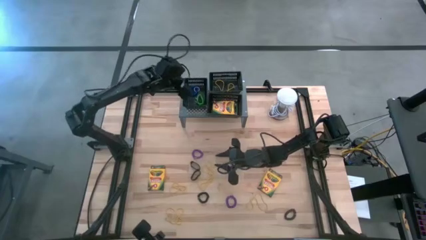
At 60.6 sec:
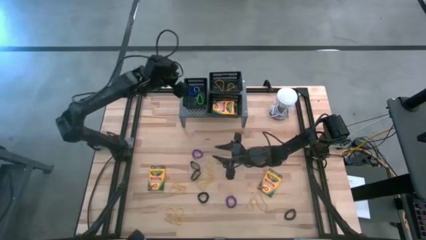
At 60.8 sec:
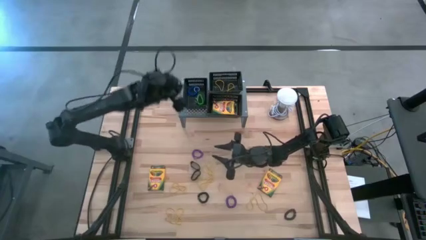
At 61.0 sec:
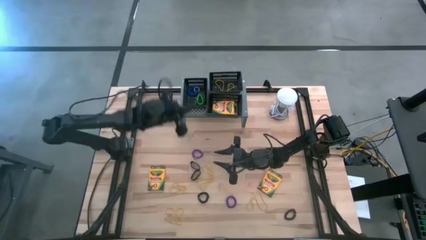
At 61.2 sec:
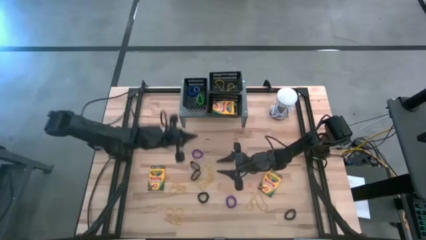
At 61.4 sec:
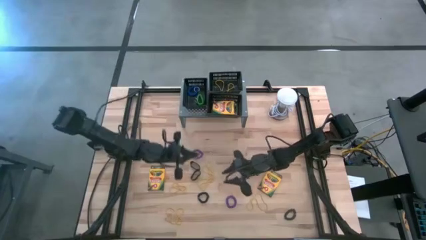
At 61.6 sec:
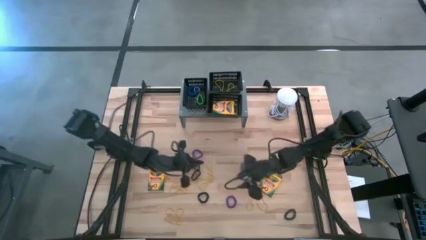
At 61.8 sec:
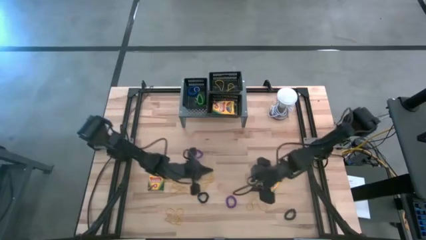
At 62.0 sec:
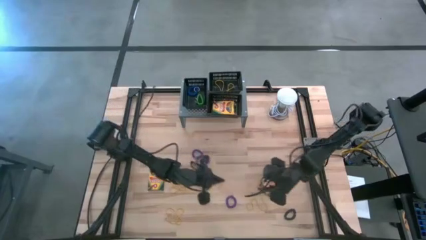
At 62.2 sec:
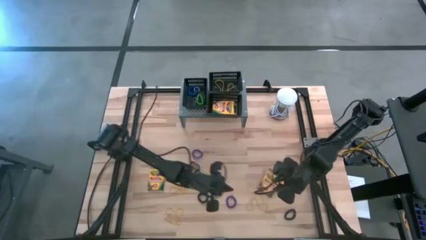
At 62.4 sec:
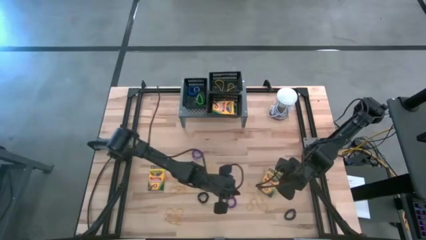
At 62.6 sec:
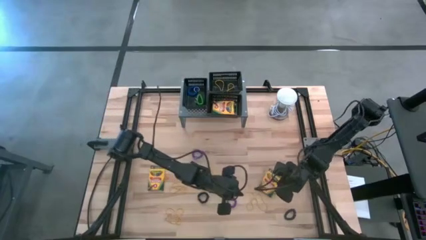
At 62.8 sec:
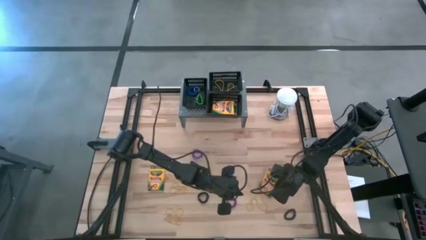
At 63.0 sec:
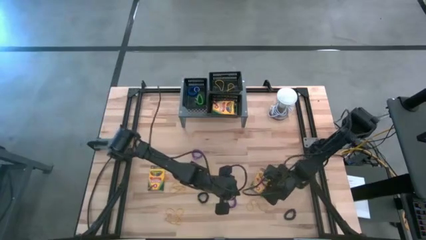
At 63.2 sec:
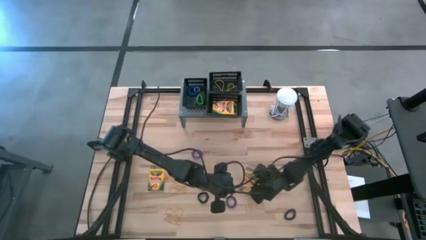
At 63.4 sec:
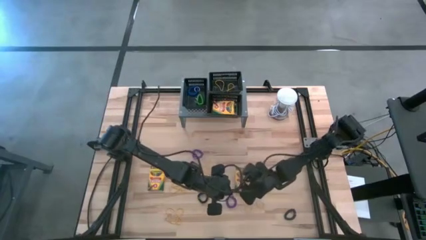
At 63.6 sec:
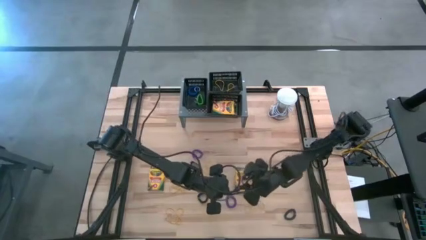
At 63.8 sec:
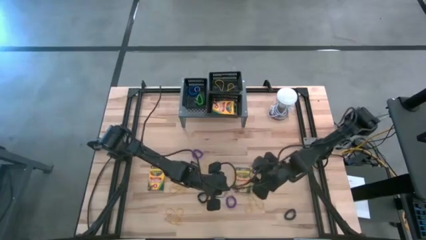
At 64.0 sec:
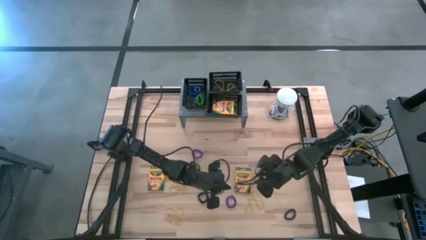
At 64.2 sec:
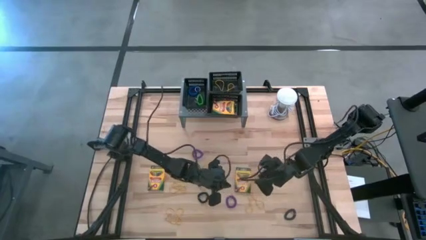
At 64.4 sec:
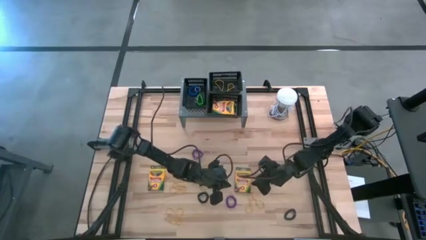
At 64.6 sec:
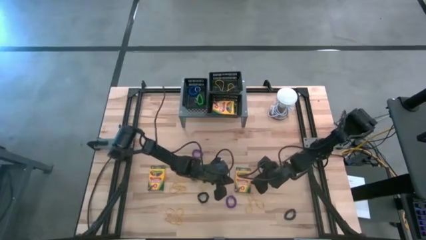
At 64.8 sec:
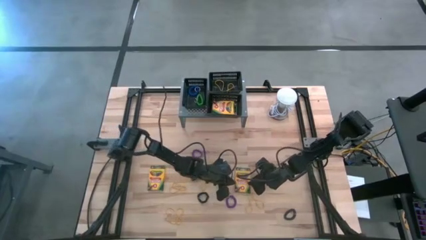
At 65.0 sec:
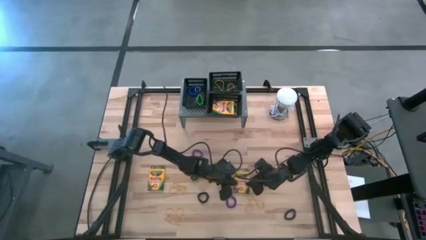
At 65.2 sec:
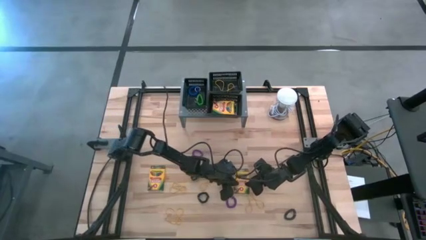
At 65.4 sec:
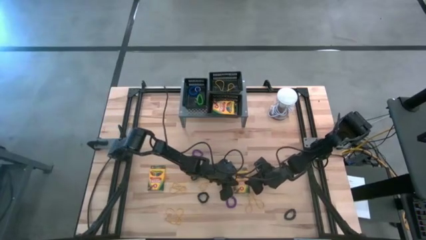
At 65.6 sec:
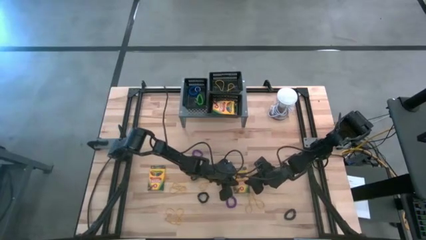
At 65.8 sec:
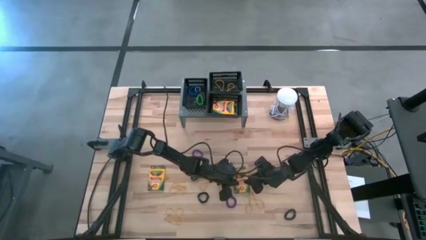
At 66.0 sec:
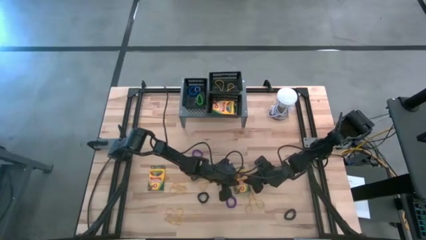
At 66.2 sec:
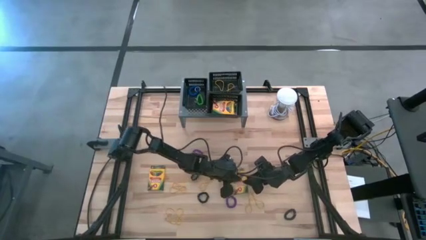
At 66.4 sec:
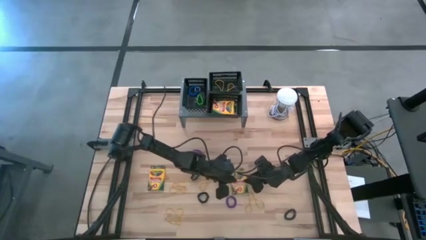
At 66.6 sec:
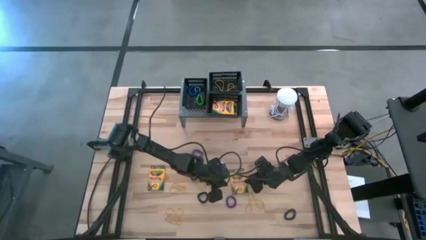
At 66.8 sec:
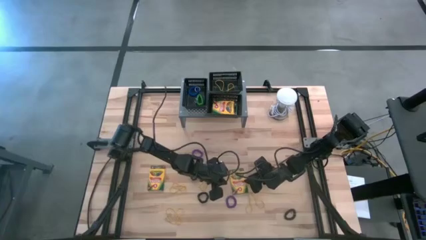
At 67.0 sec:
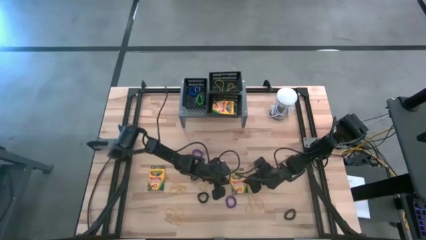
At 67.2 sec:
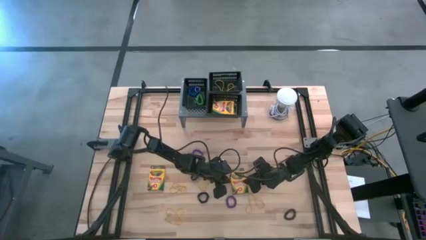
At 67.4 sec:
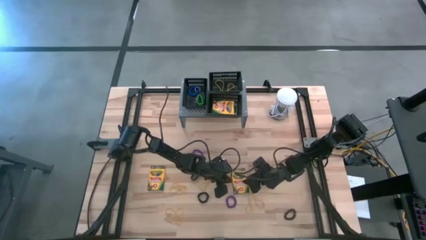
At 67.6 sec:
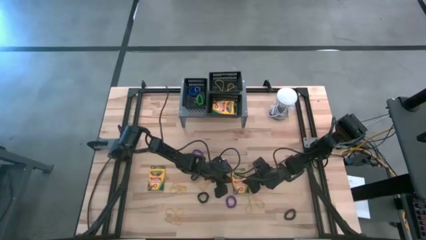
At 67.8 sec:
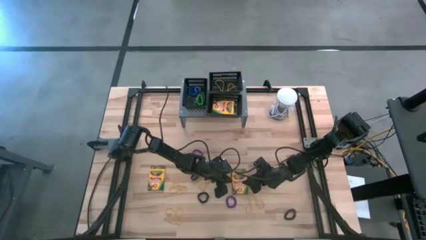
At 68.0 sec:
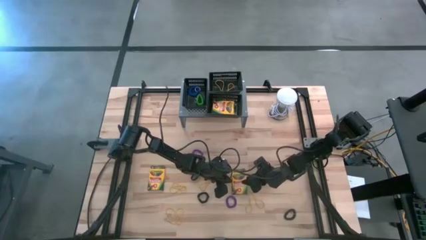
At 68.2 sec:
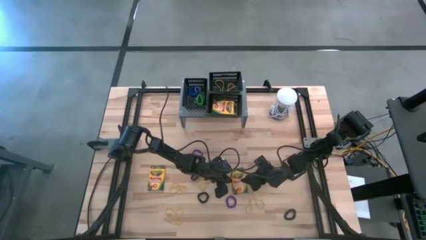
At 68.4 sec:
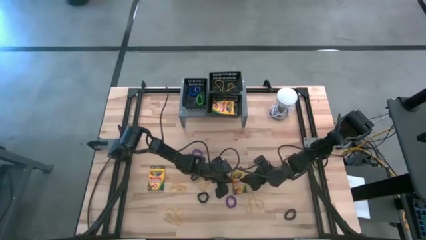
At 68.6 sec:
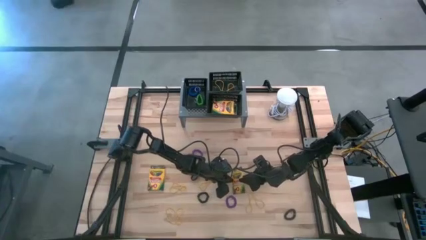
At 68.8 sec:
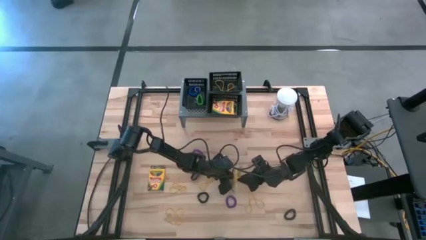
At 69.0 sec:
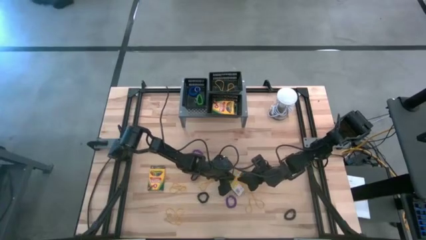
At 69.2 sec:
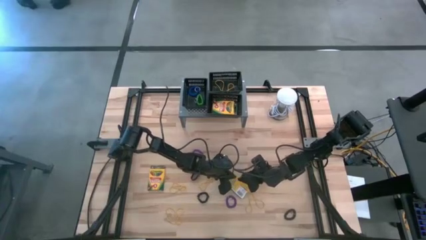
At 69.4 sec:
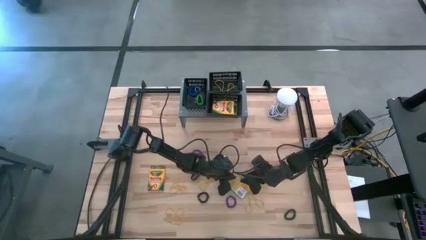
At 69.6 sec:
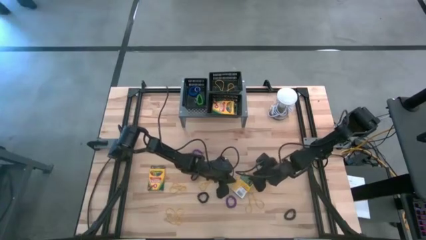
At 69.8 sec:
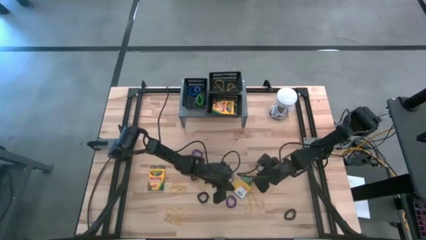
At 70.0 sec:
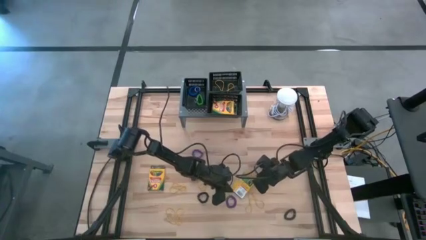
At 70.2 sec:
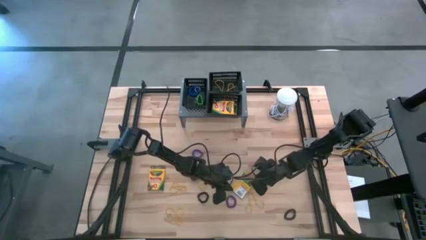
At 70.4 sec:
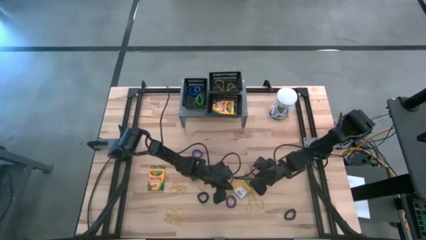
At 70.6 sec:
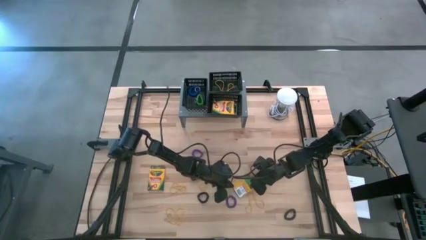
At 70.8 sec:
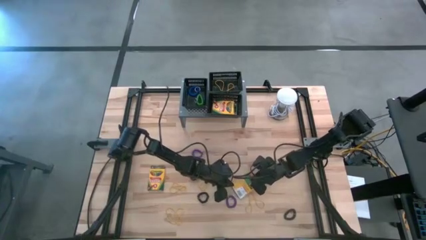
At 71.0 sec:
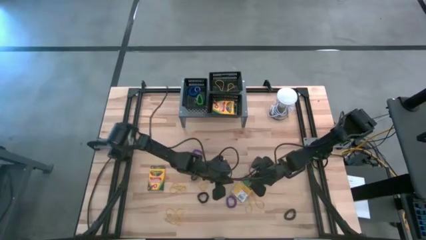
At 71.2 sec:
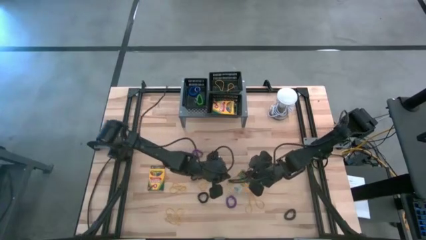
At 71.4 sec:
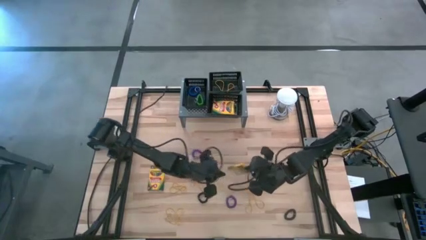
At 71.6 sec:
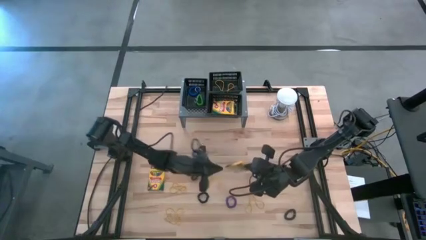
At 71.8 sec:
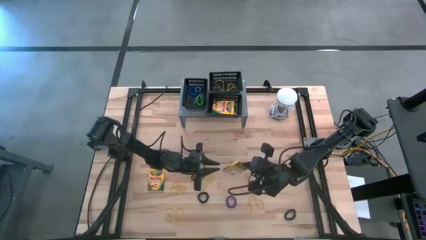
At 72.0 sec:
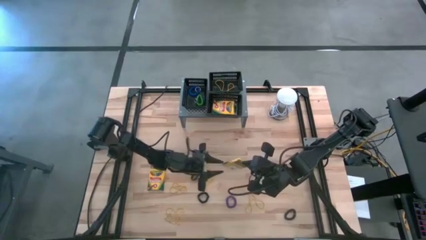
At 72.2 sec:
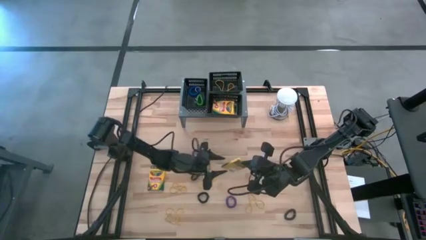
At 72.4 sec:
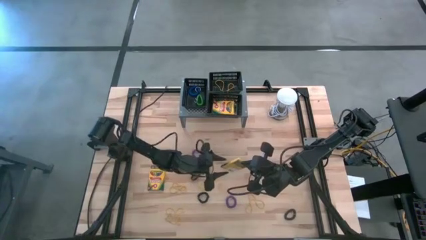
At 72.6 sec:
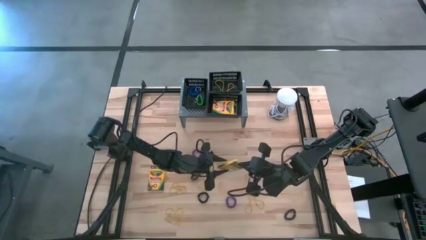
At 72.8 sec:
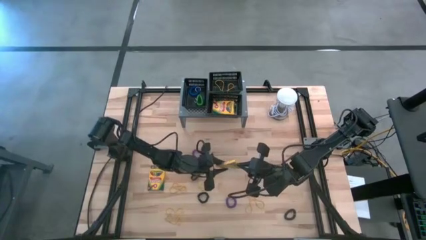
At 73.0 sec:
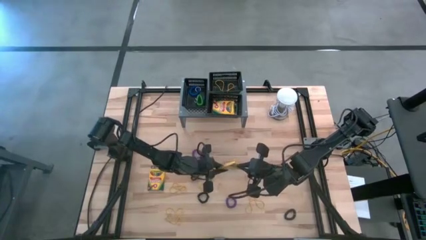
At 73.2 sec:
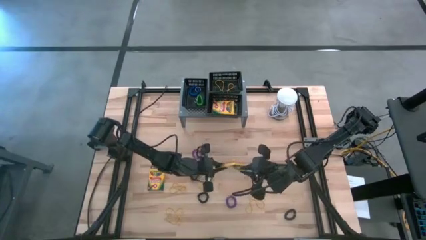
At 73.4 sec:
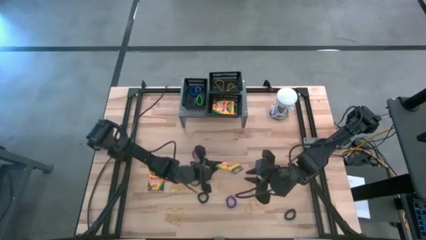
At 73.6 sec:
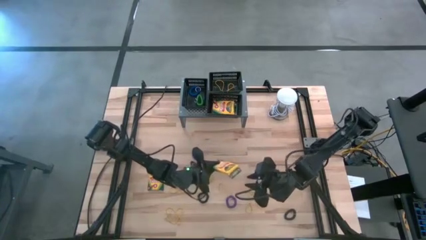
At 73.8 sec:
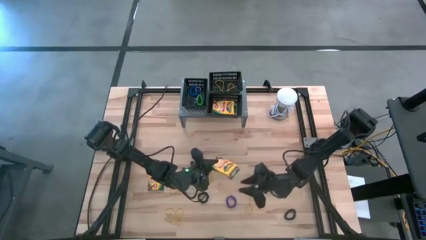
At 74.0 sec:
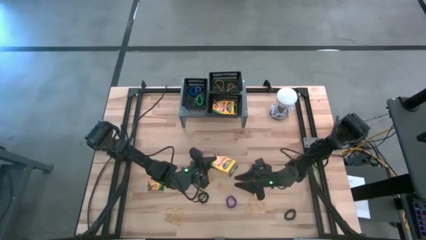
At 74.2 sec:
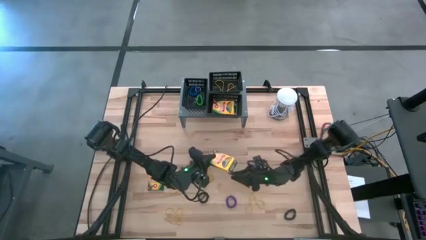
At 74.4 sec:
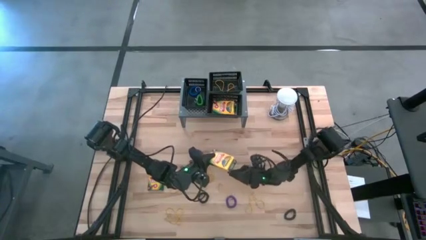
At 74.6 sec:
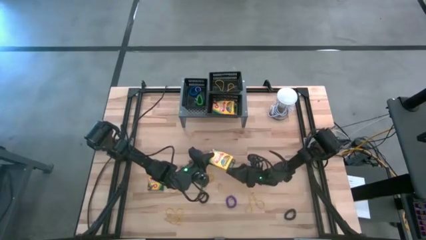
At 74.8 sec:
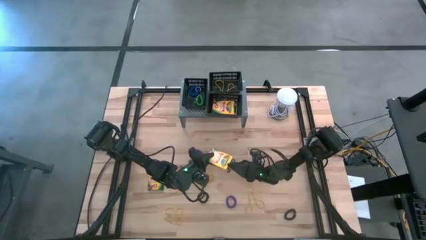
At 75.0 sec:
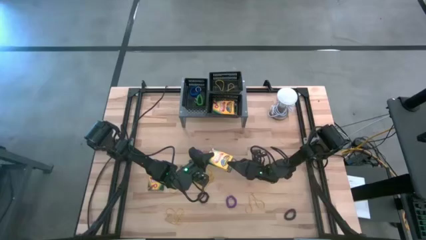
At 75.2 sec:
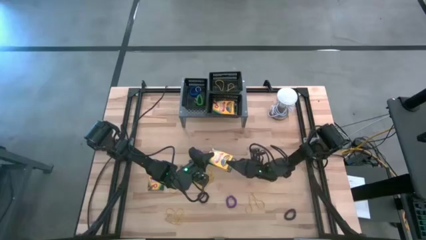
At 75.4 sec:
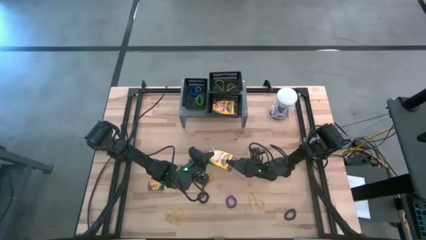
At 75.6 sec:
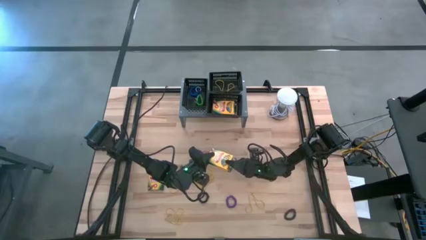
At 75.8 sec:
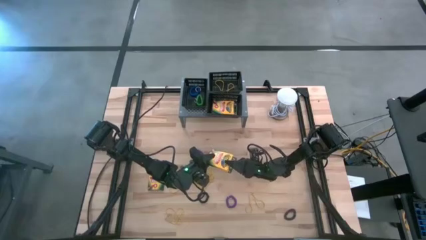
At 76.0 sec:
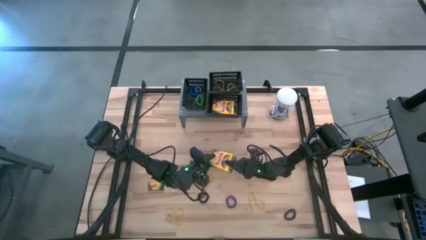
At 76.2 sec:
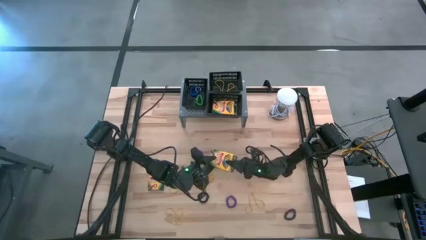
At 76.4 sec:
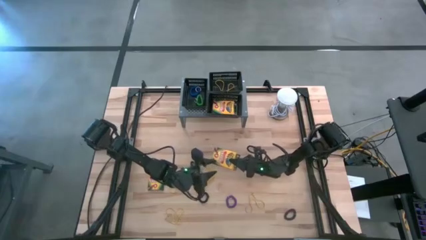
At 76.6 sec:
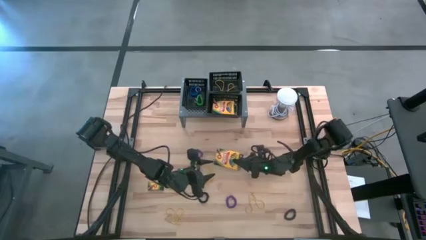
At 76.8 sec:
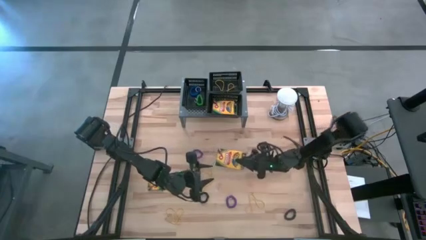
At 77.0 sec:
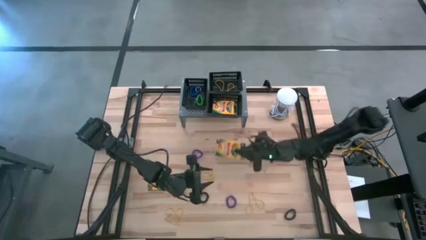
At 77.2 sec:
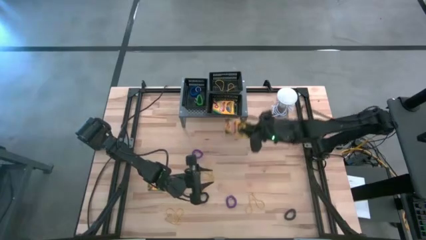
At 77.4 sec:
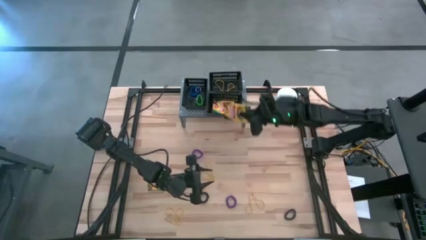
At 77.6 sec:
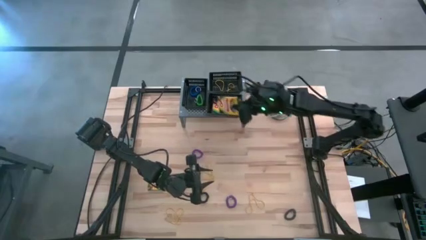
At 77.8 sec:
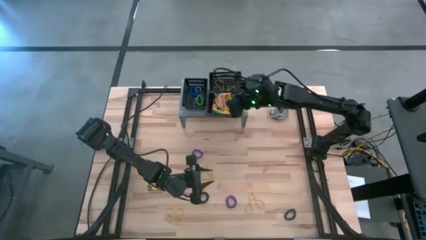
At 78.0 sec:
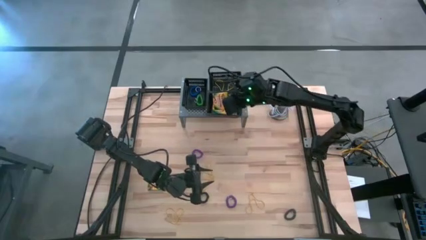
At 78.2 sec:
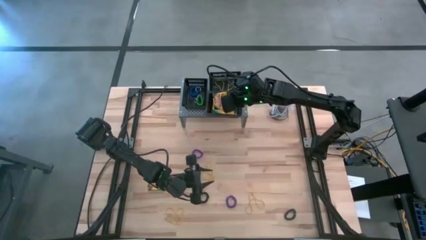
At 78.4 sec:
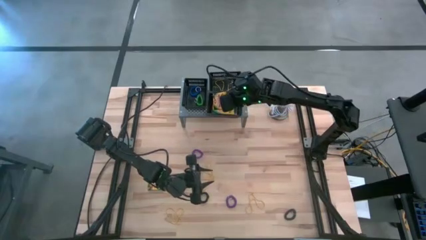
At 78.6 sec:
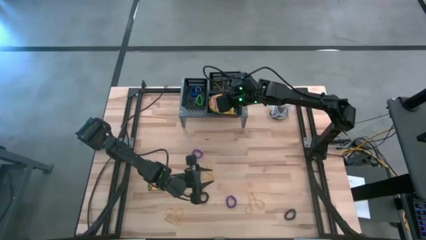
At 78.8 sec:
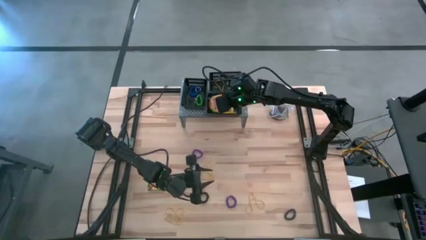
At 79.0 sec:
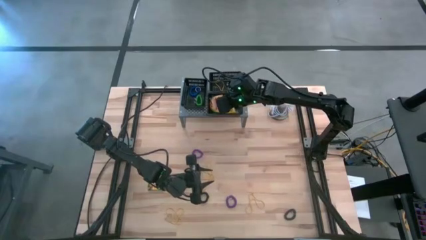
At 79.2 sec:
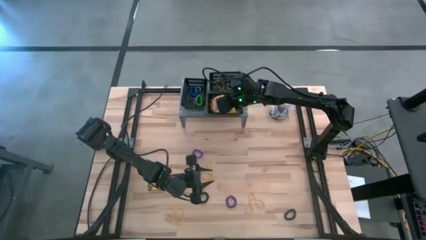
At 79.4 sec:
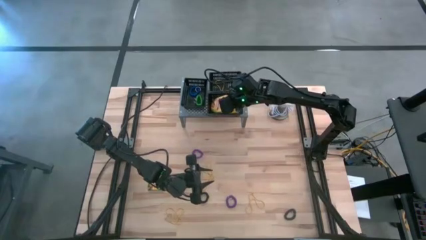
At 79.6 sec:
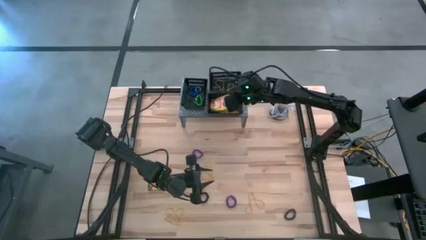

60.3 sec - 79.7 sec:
Task: Pick & Place Office Desk Supplies
Put the crayon box into the bottom black bin on the shelf
